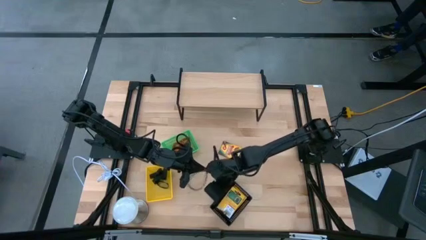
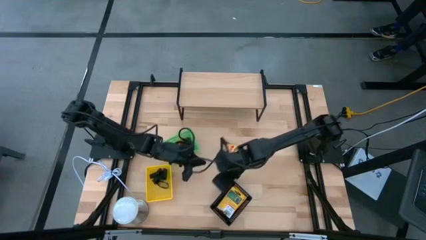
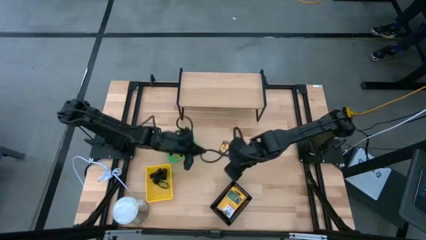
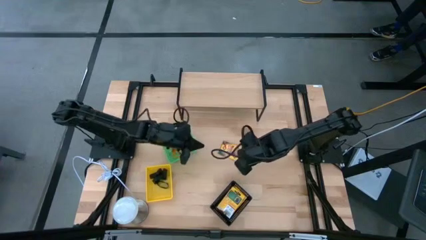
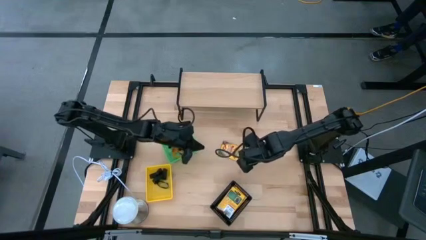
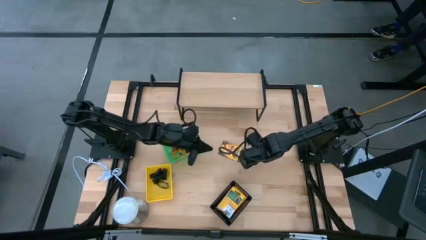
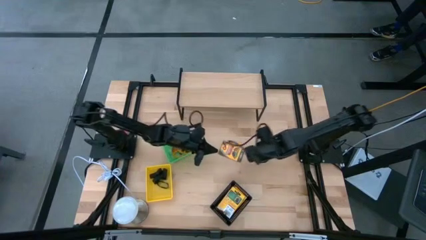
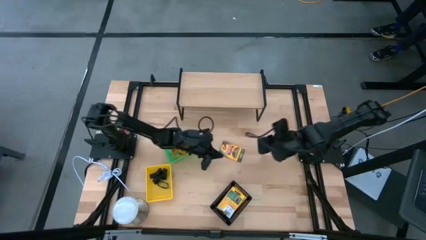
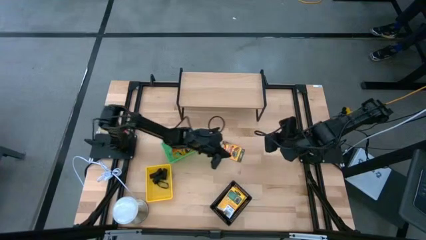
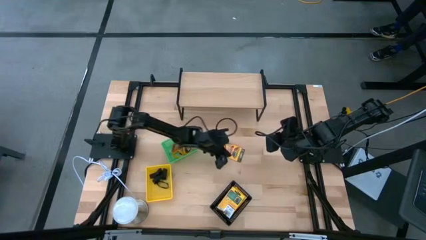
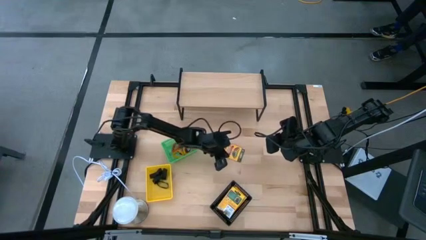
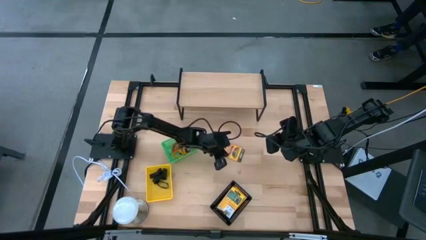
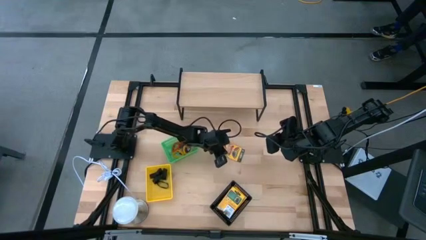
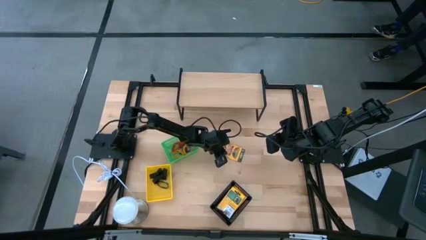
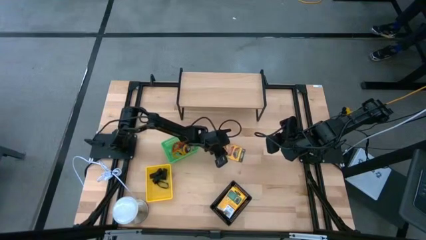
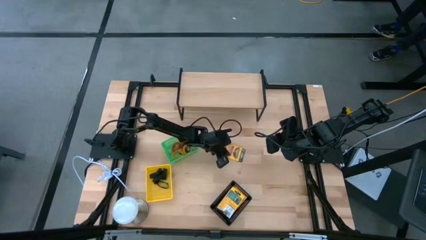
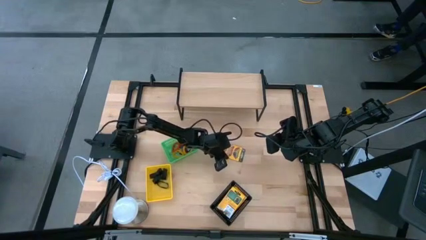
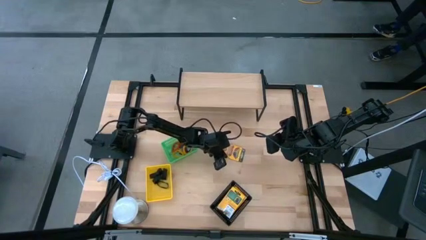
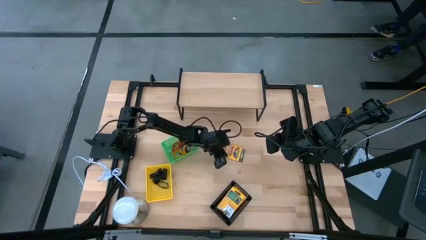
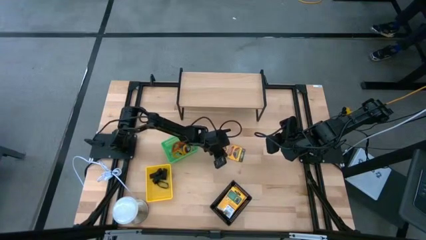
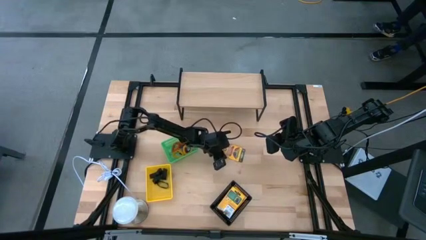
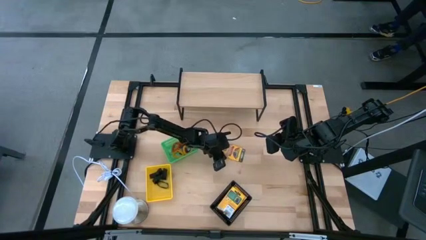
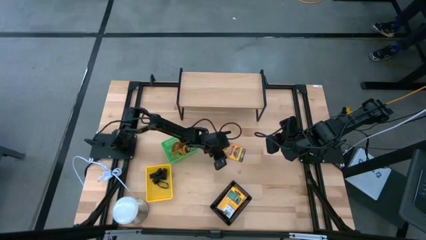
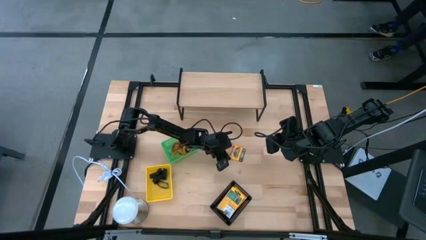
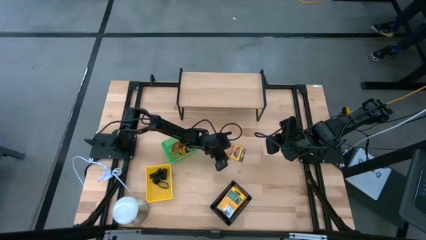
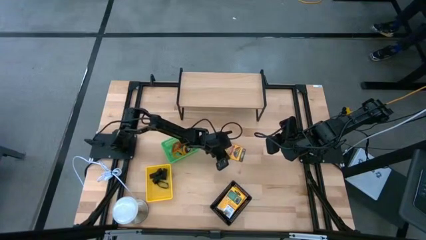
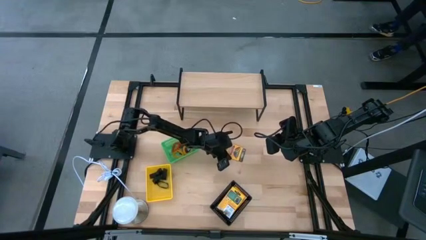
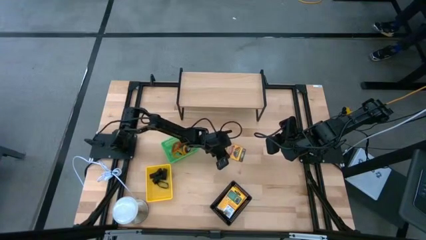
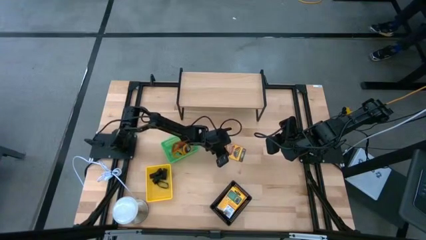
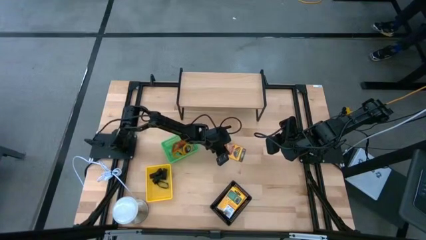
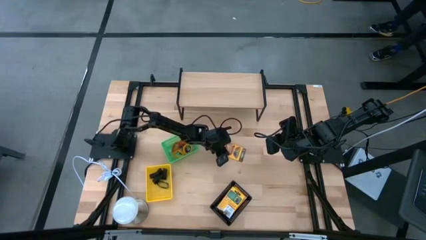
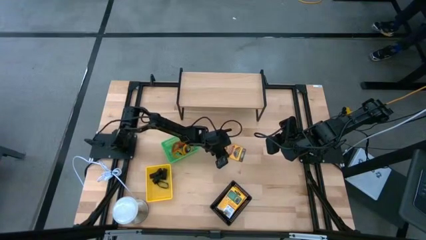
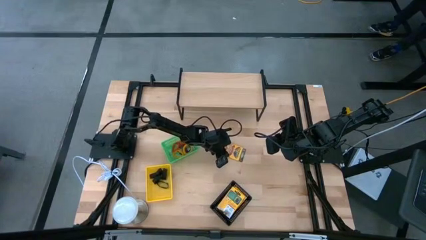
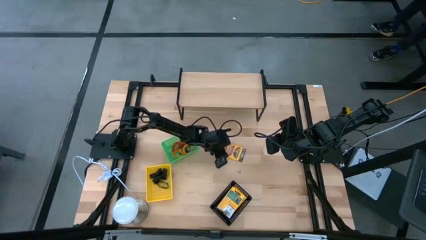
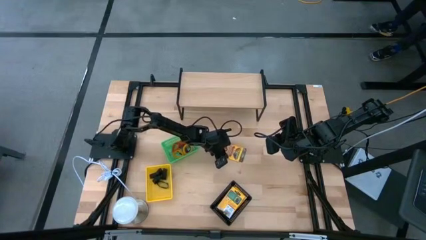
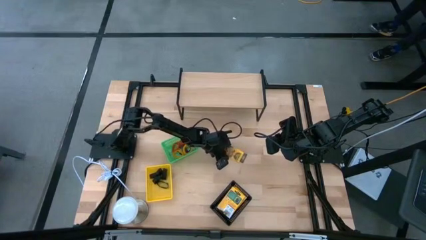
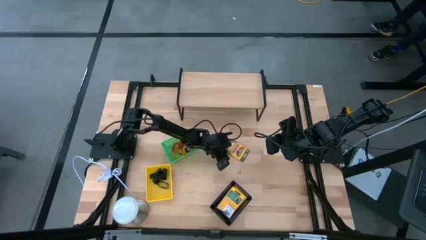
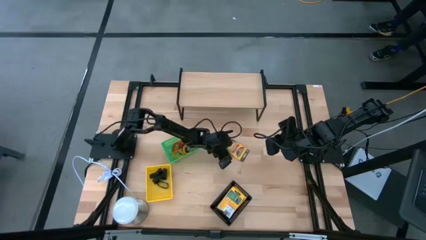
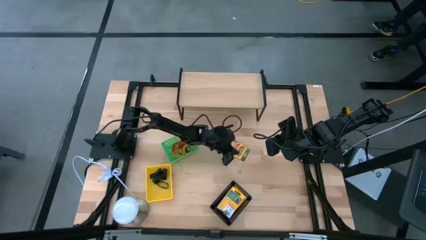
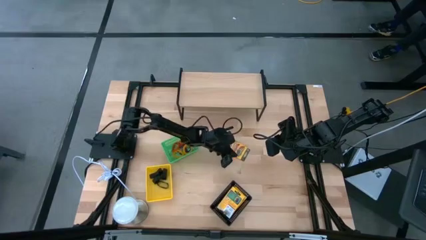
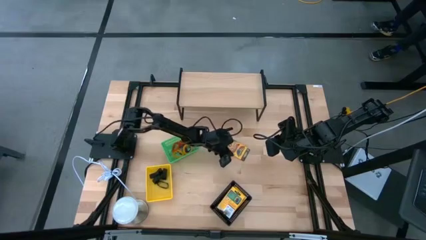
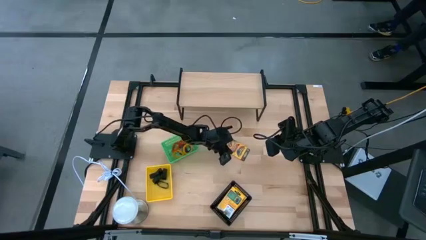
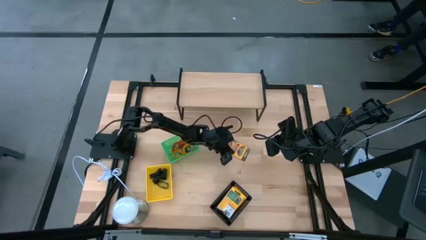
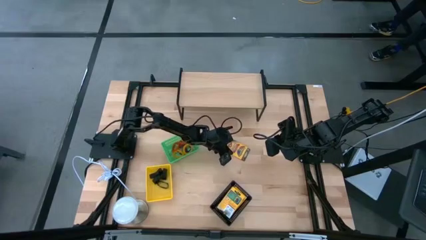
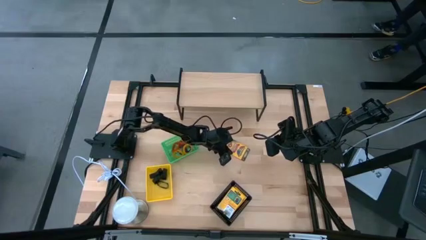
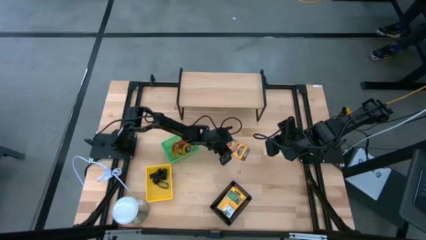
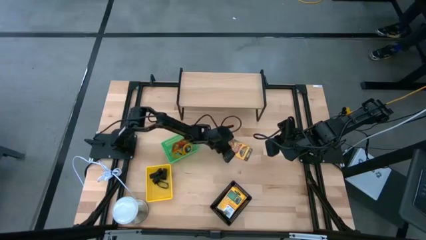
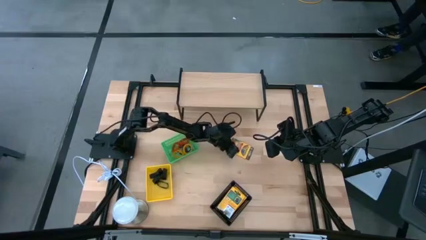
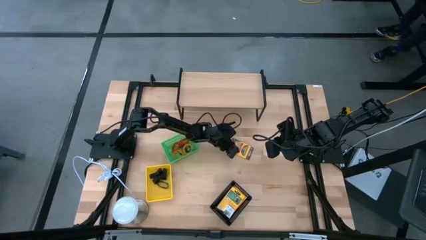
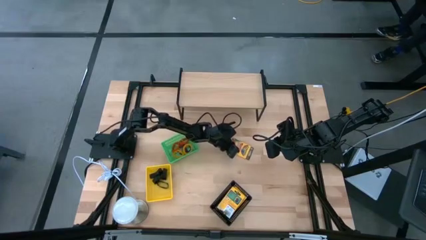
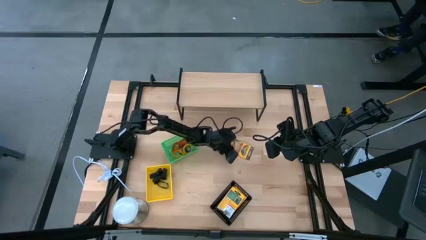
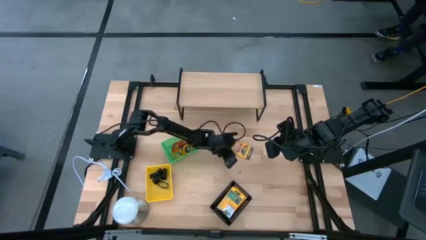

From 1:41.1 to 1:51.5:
Task: Pick & Place Office Desk Supplies
Put the crayon box into the black basket

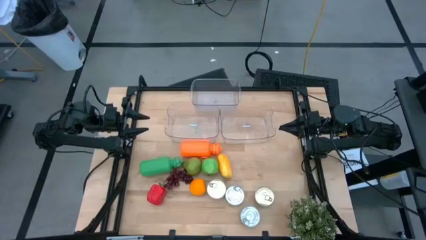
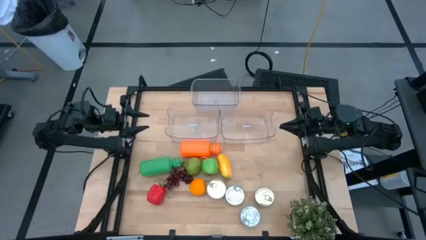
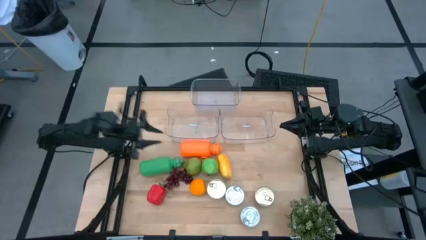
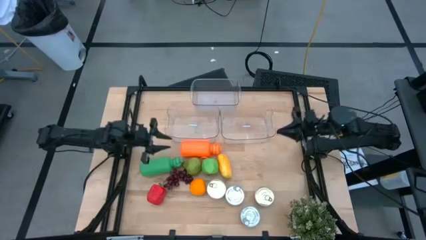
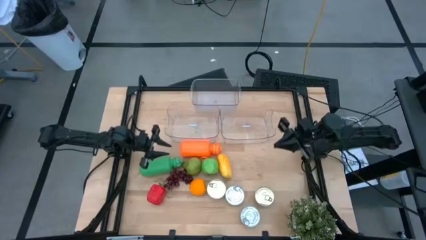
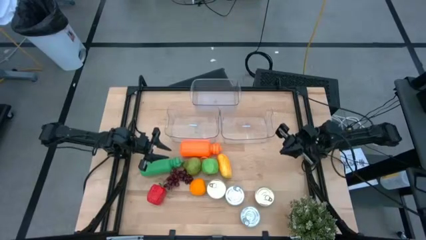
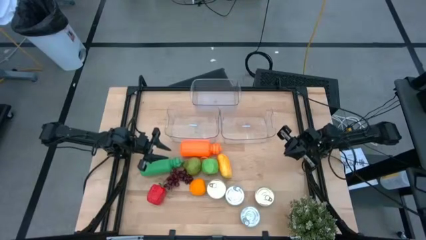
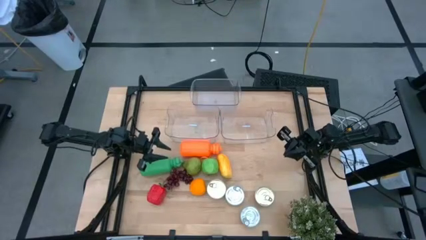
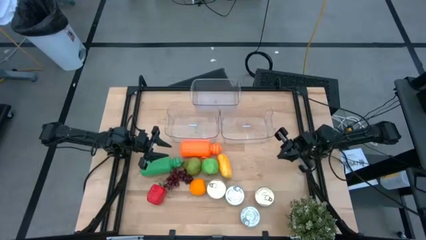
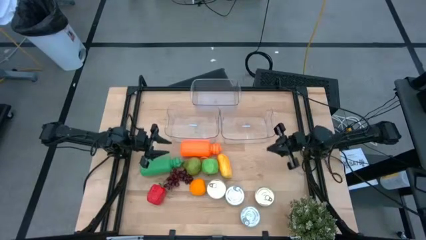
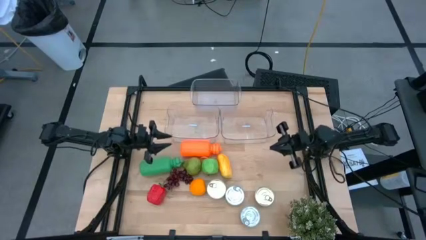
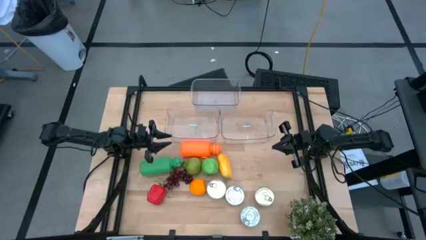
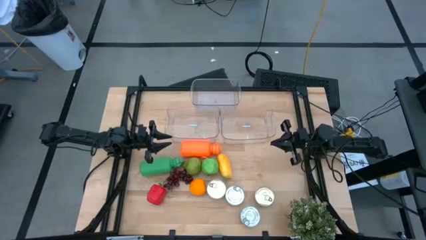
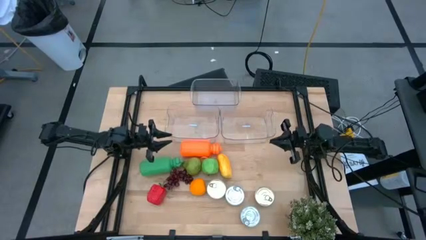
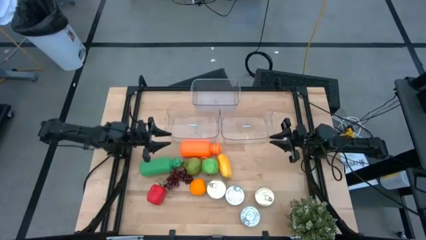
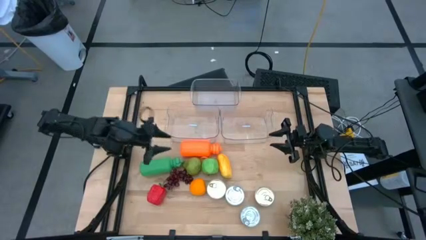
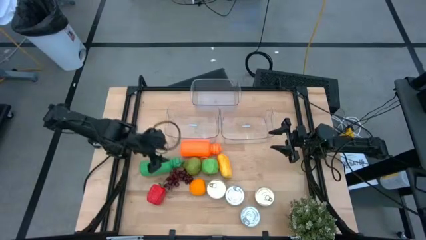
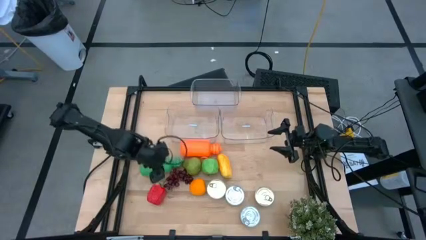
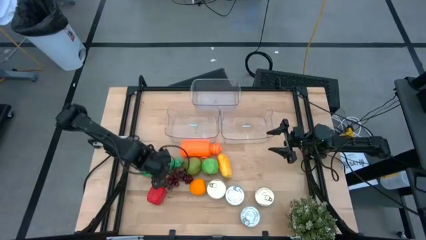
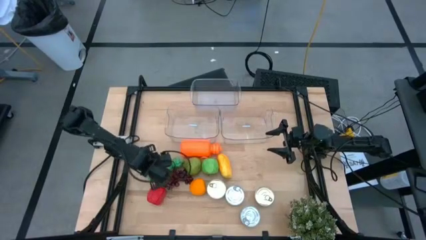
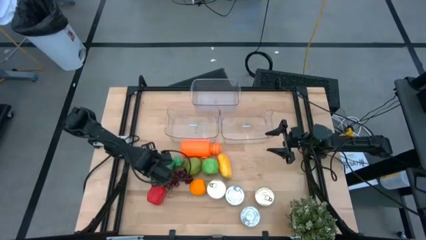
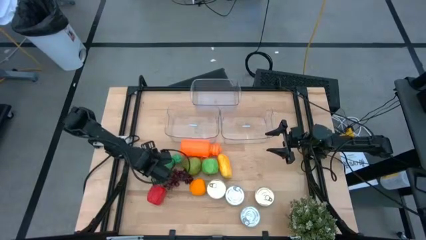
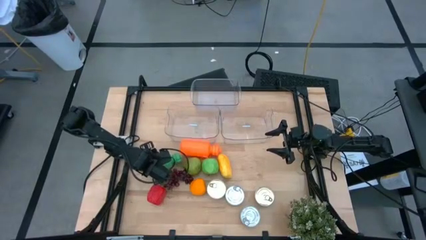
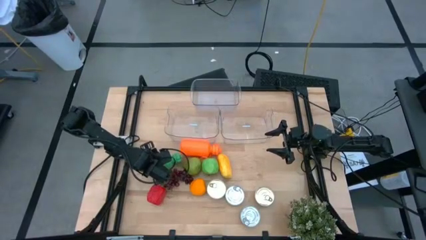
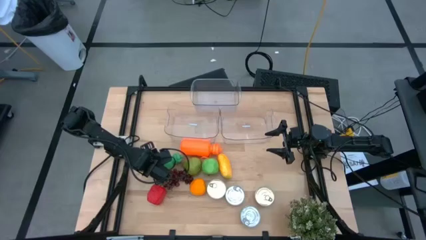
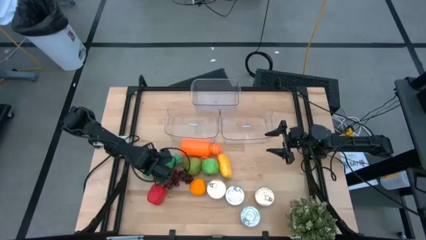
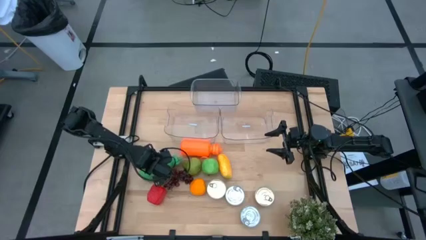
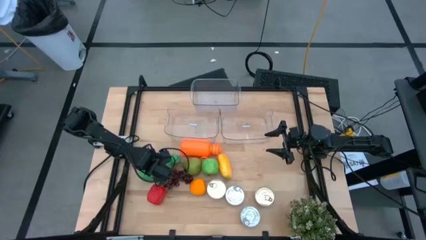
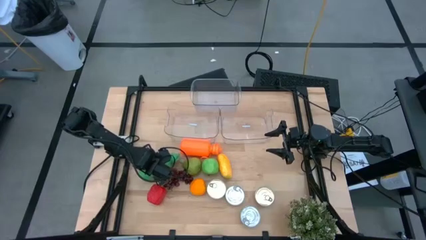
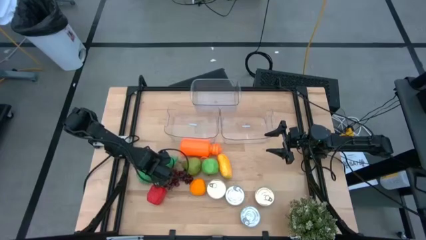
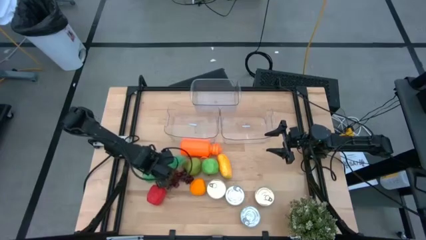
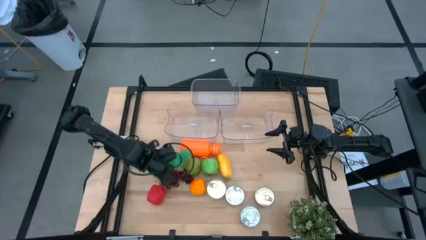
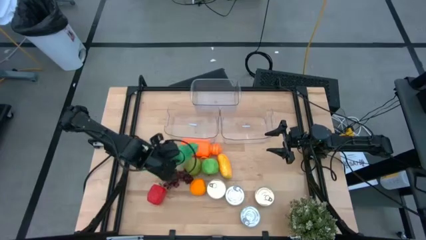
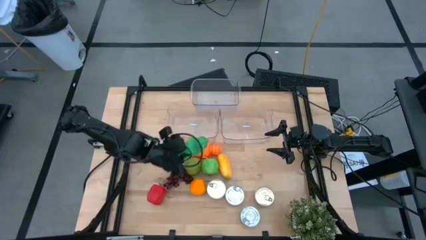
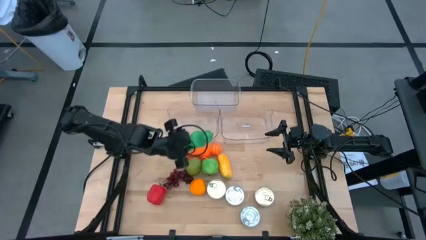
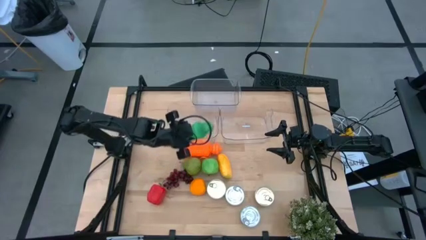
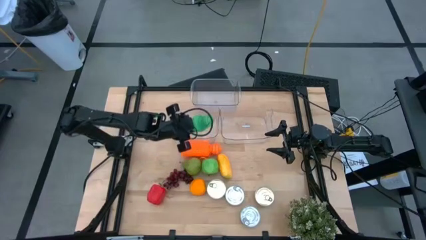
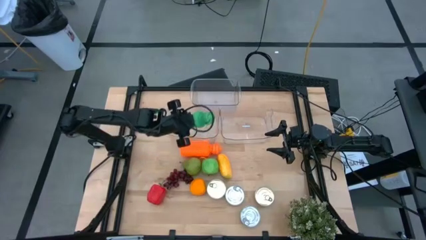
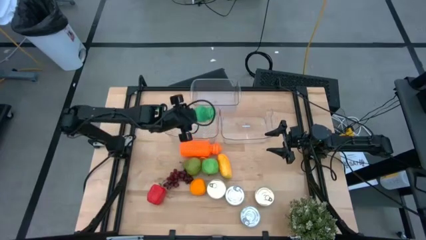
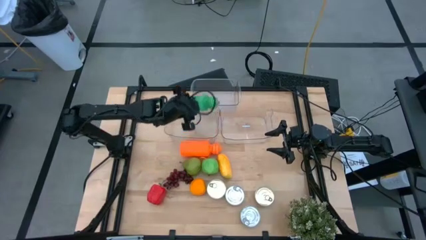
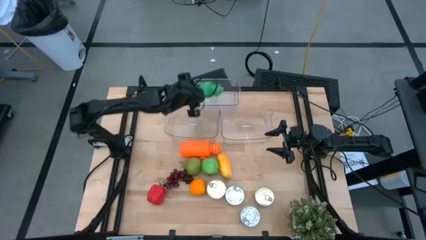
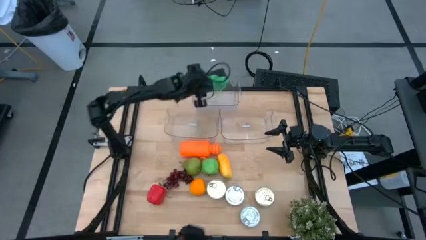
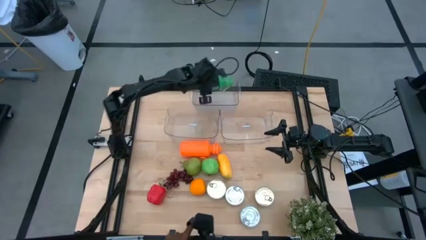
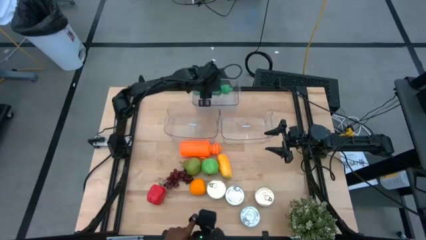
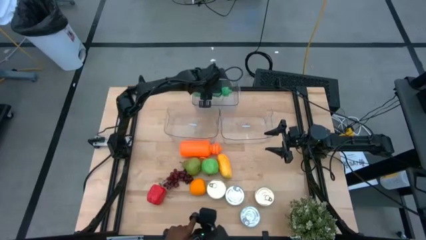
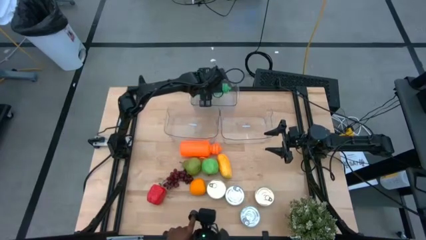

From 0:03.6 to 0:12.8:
Task: Pick & Place Food Item
Put the green water bottle into the top transparent bin
